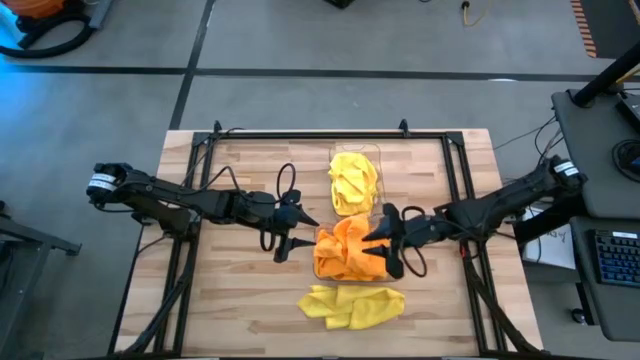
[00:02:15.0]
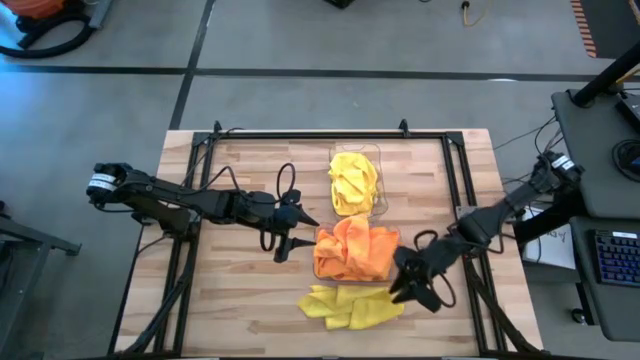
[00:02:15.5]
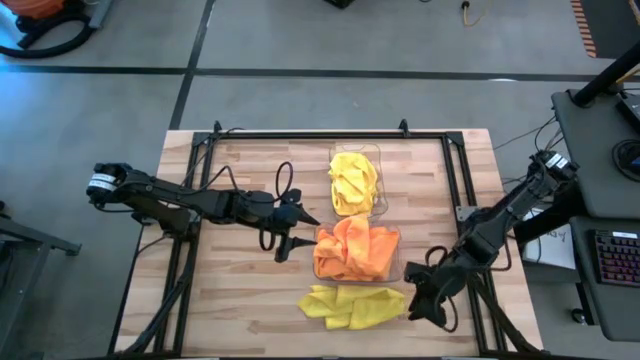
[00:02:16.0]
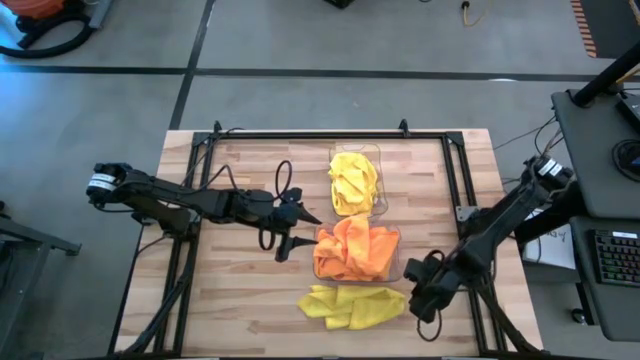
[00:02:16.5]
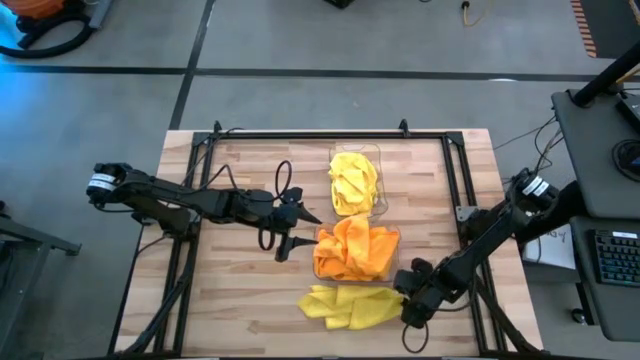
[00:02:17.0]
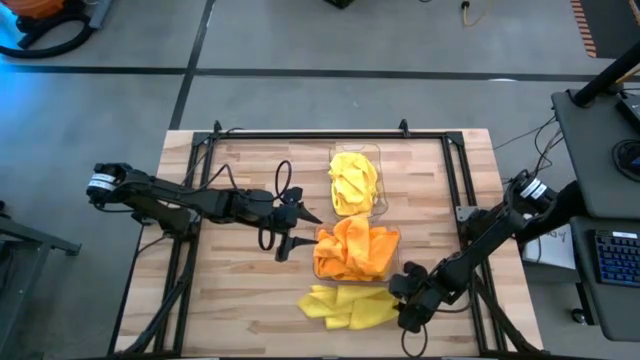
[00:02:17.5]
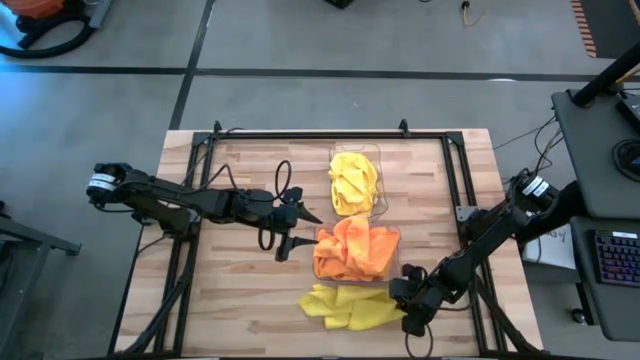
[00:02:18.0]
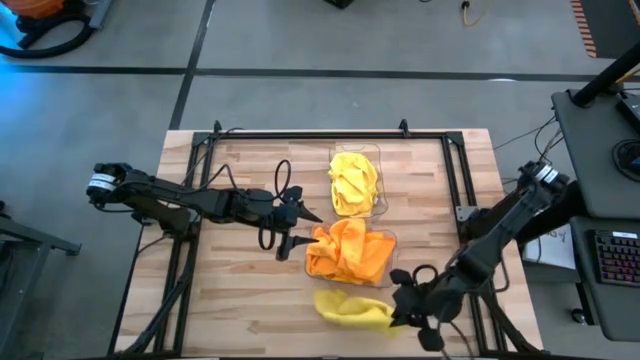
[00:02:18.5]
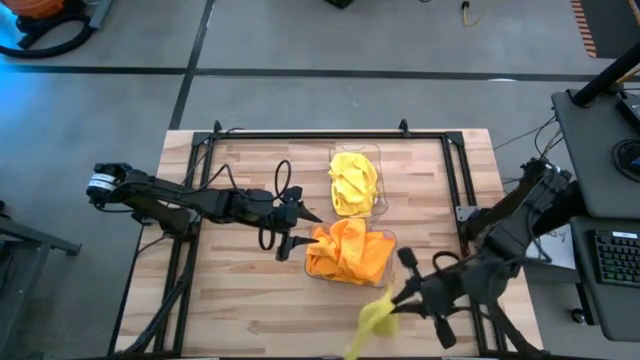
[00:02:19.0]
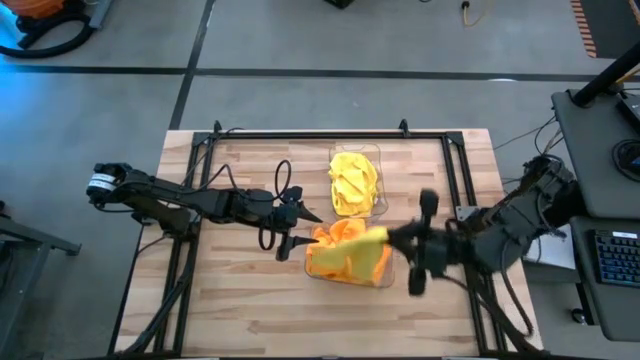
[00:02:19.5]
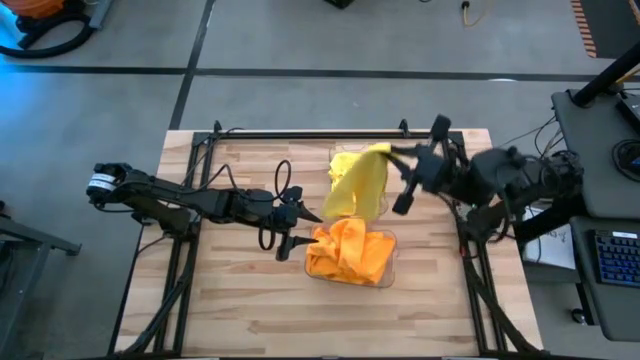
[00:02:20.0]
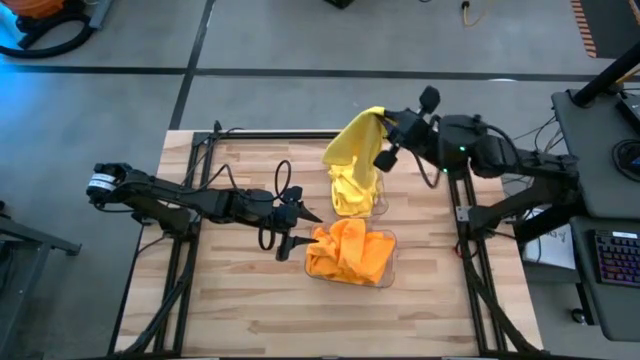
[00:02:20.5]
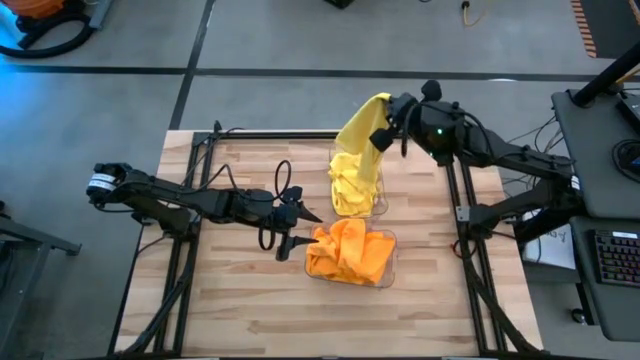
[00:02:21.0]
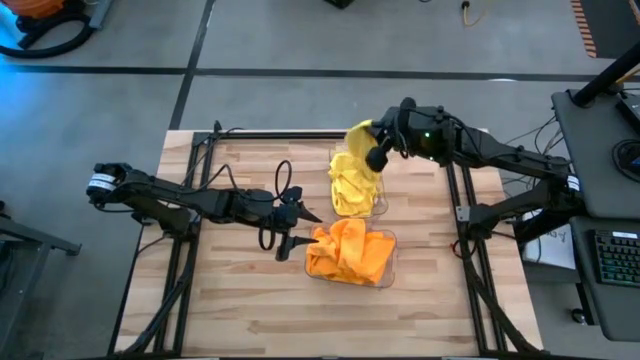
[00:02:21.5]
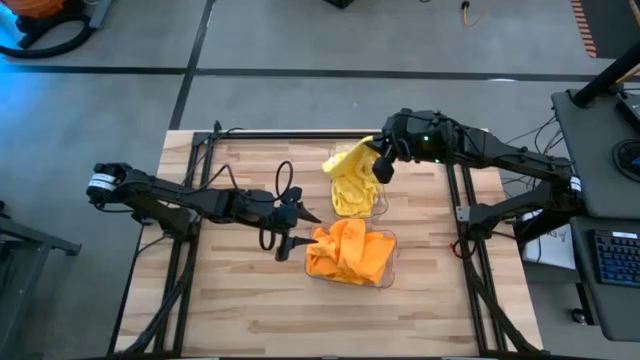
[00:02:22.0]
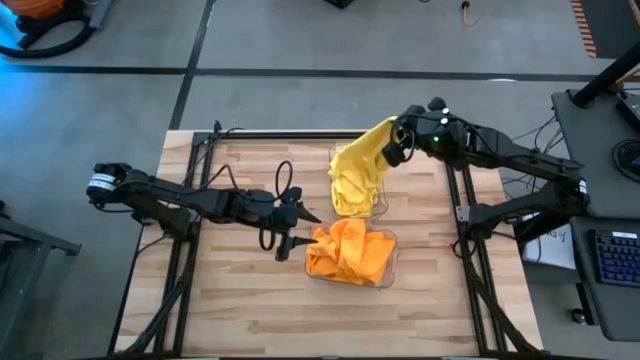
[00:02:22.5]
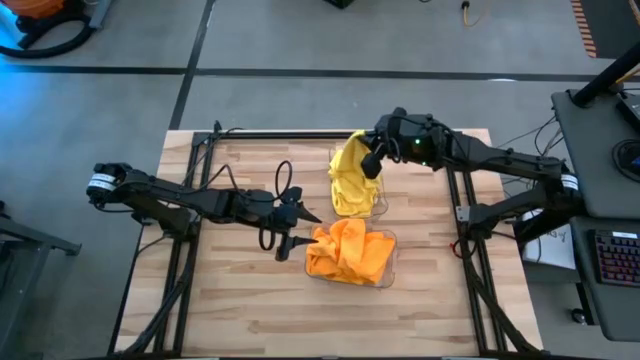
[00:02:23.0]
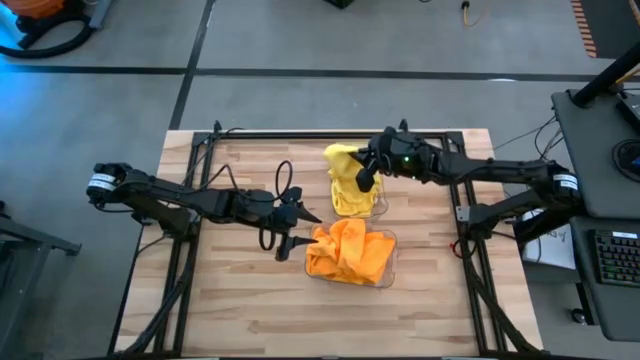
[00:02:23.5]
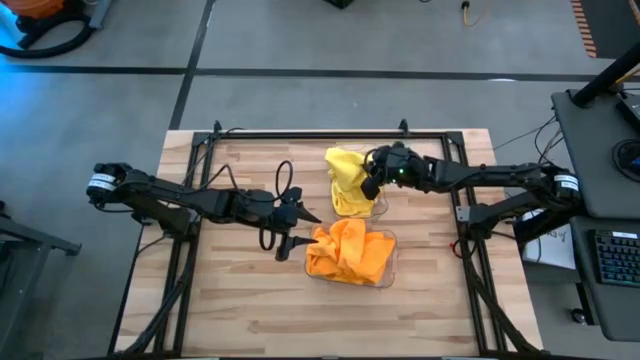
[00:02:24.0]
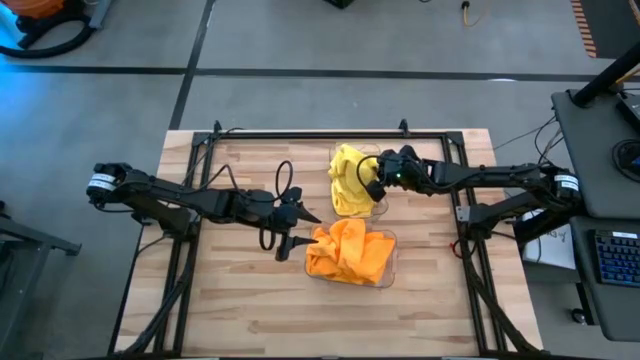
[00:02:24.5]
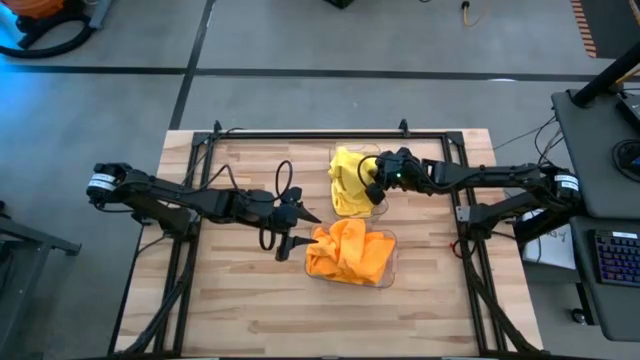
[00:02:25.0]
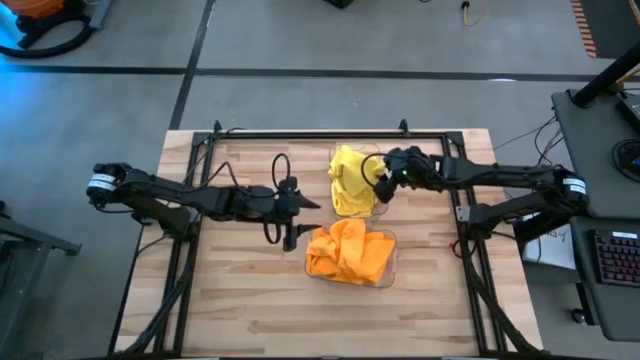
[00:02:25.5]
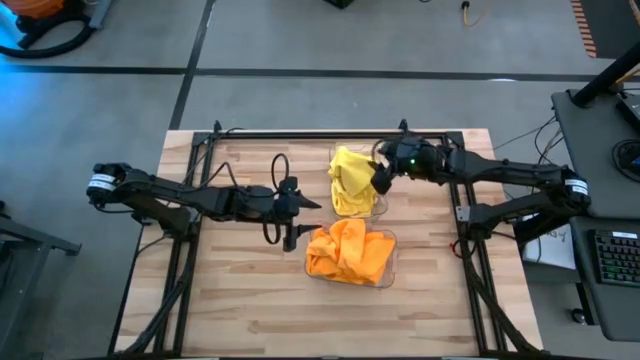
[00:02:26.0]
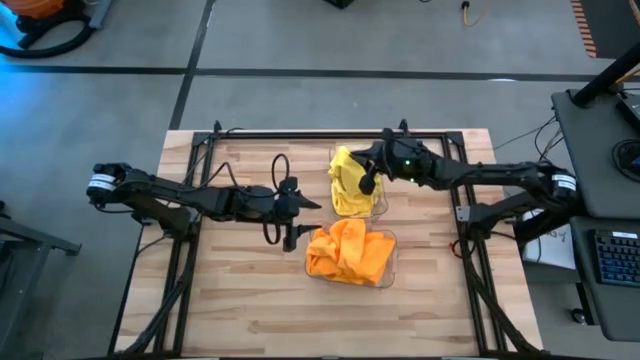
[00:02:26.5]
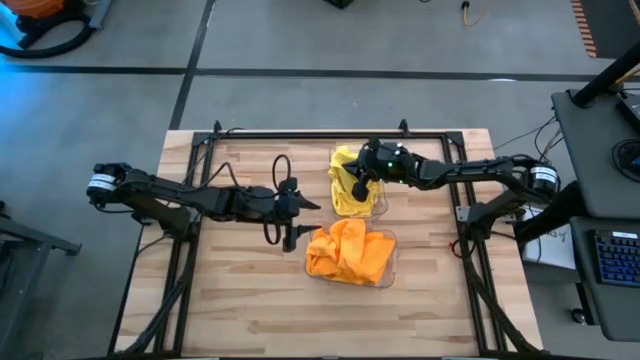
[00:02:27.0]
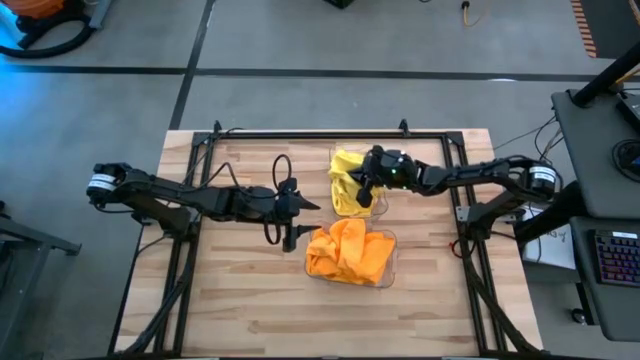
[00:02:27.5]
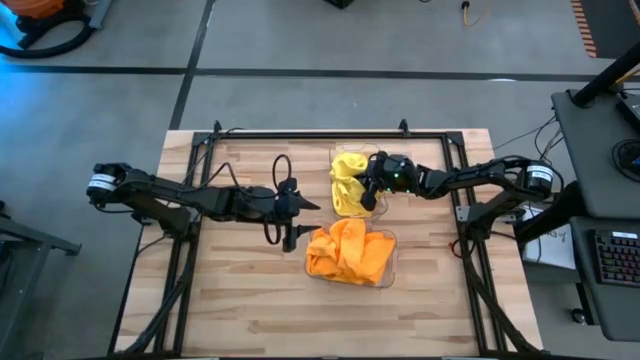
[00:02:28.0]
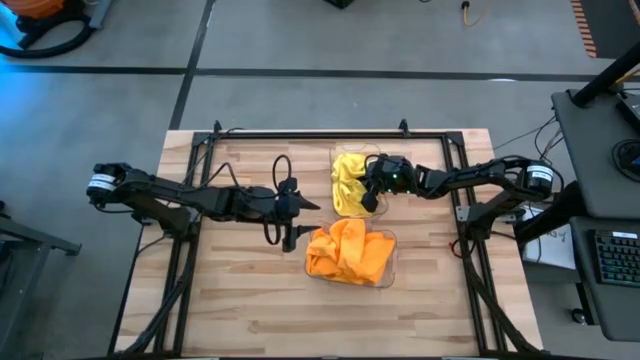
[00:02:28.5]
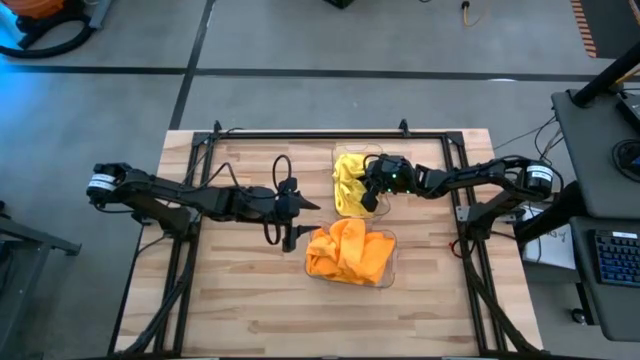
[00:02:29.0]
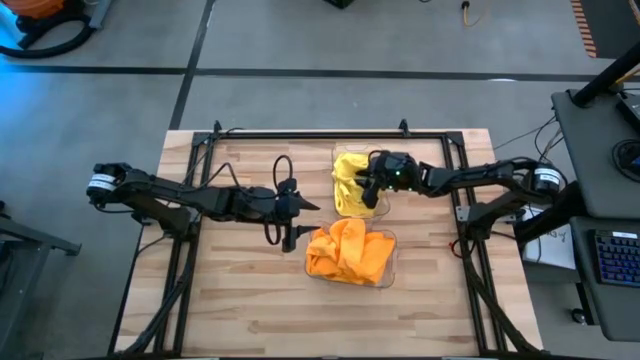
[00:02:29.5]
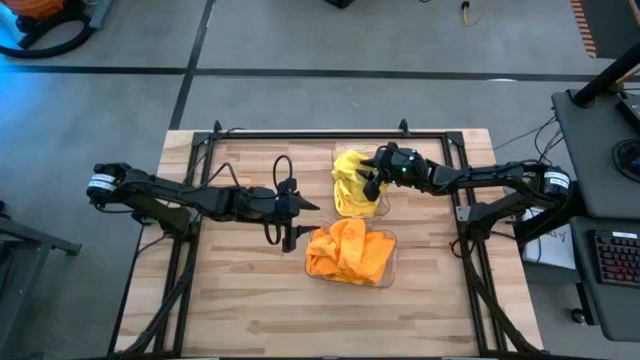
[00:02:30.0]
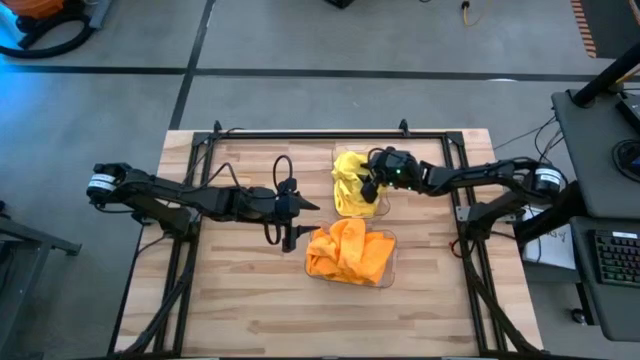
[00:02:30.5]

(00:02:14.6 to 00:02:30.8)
Task: Sort microfiber towel by color & place in baskets
Put the yellow towel into the top transparent bin

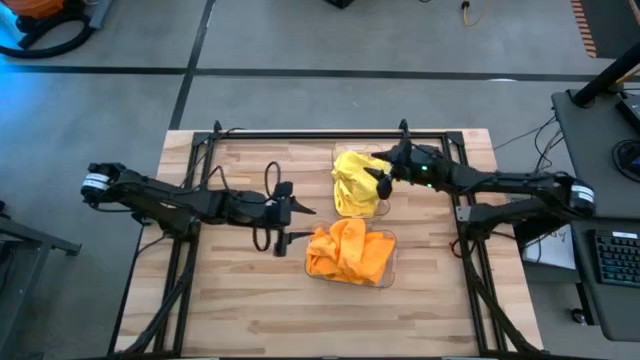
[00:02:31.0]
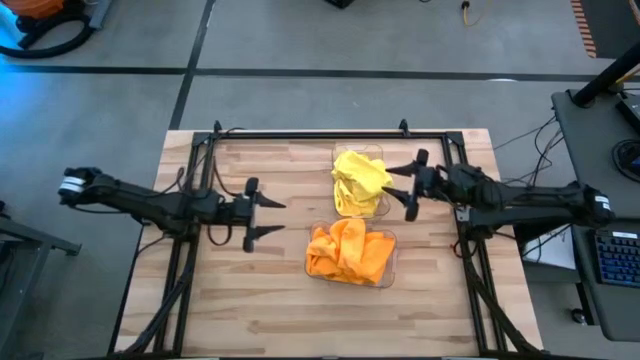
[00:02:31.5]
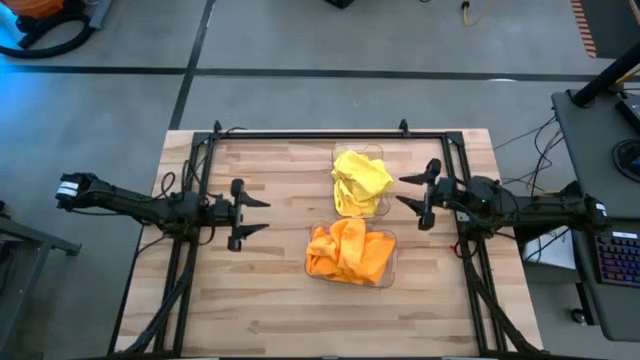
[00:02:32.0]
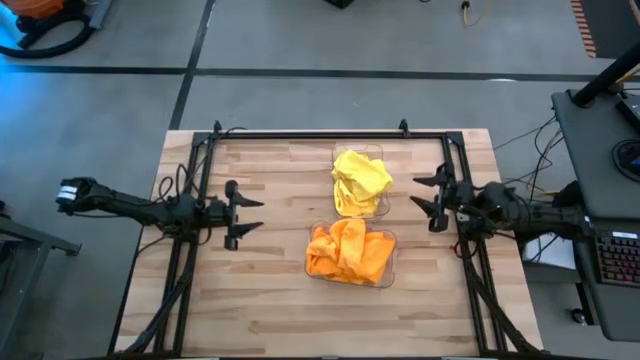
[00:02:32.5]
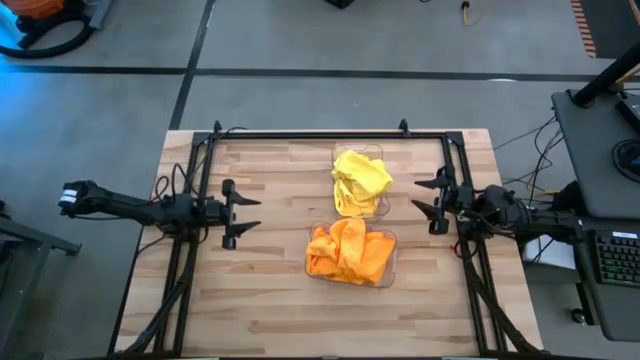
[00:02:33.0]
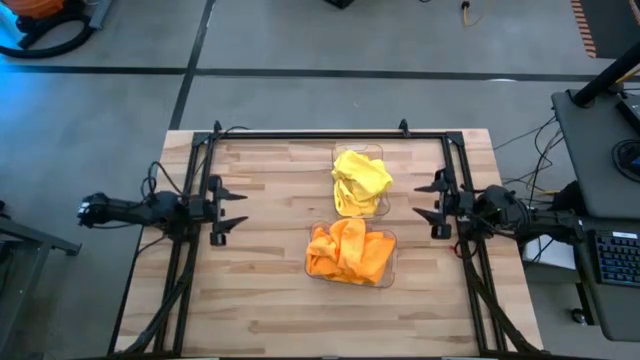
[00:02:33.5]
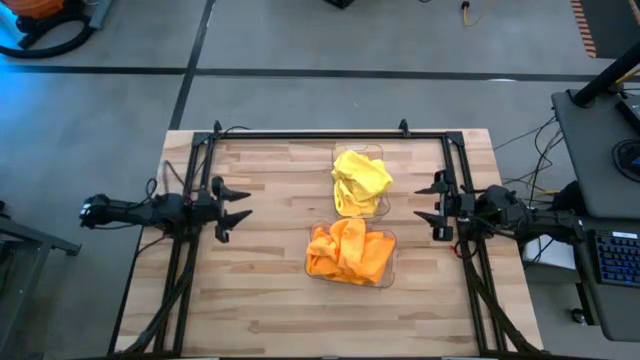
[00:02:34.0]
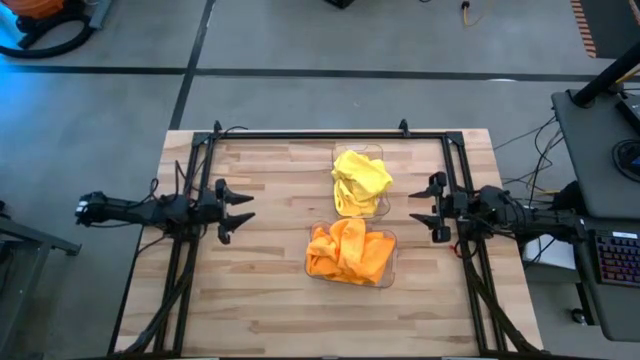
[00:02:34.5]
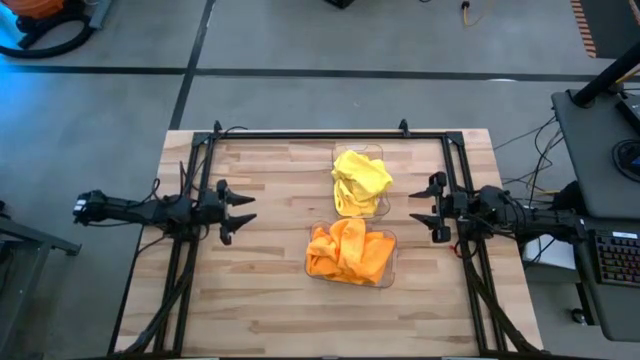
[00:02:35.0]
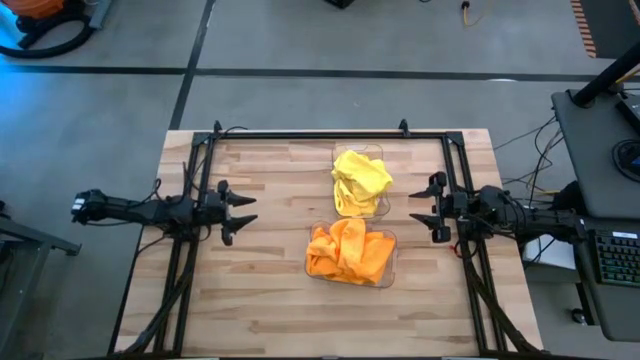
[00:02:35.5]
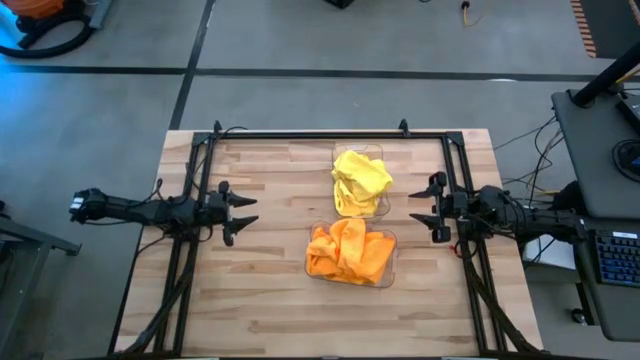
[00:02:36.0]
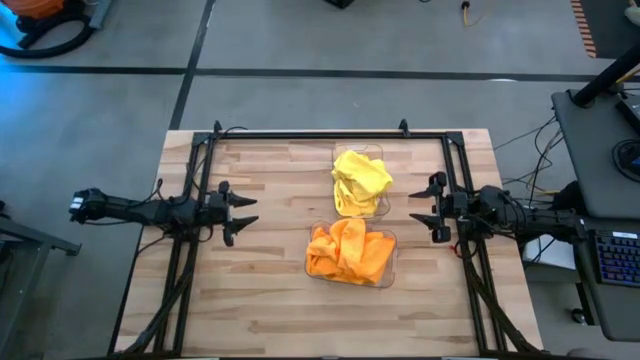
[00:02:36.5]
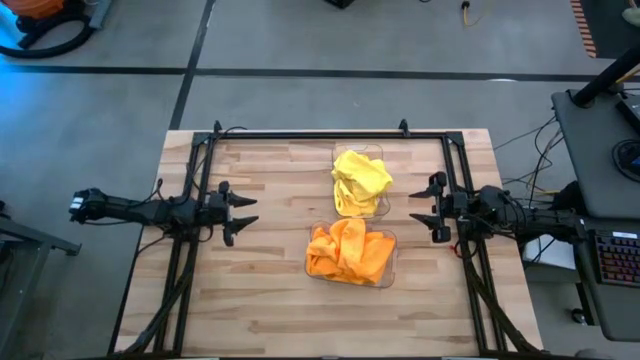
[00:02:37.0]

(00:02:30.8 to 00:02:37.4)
Return to Home Position
